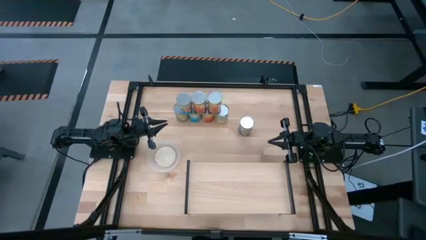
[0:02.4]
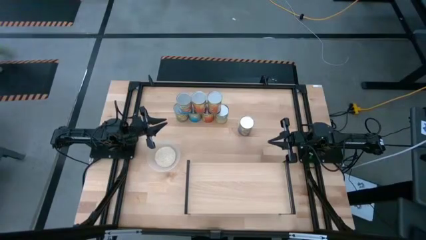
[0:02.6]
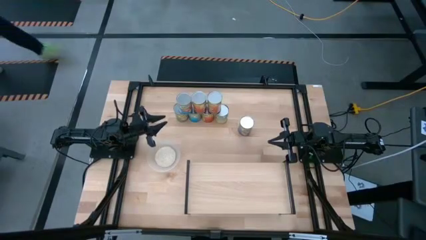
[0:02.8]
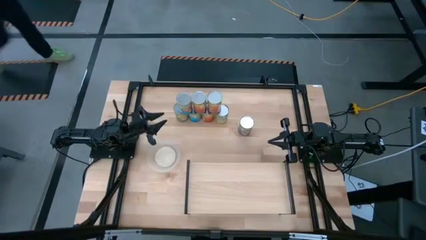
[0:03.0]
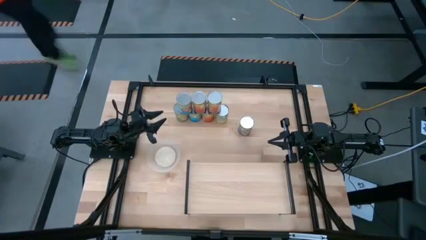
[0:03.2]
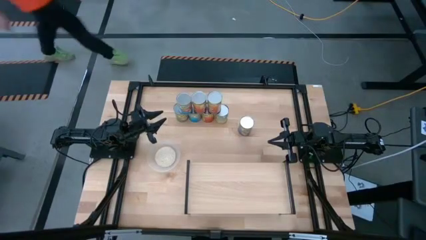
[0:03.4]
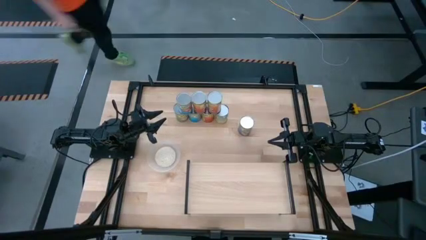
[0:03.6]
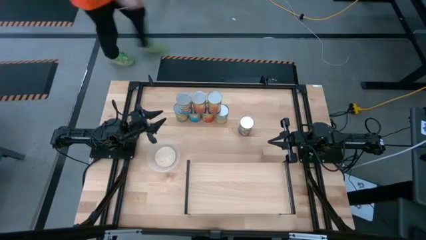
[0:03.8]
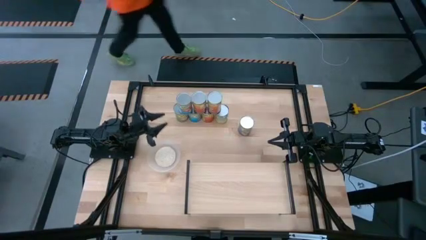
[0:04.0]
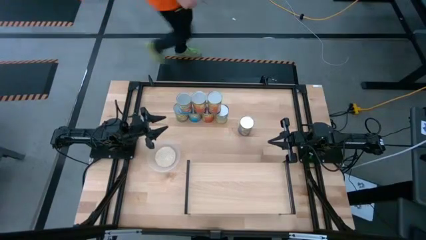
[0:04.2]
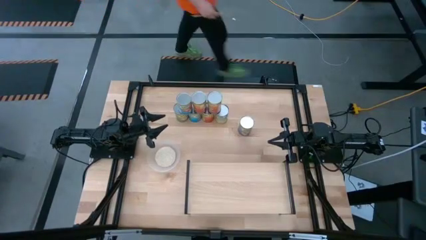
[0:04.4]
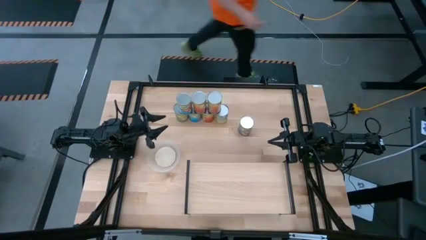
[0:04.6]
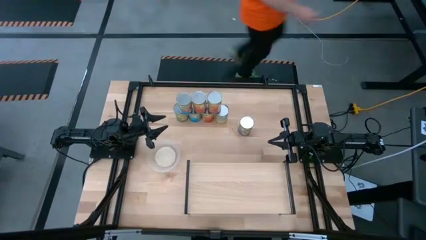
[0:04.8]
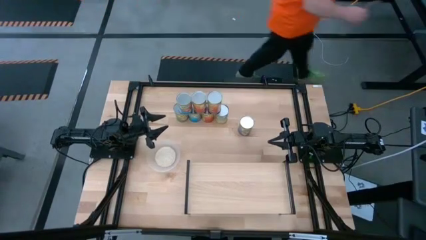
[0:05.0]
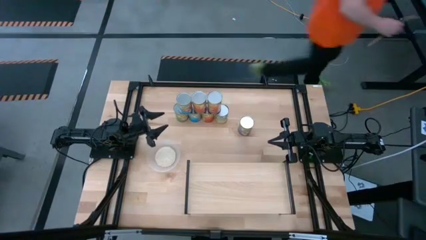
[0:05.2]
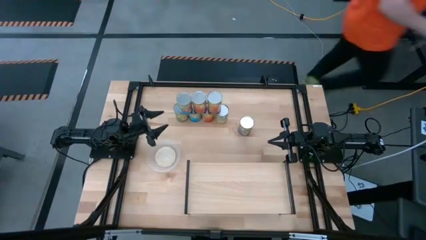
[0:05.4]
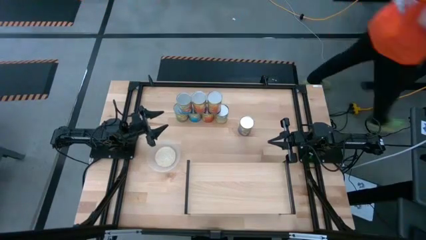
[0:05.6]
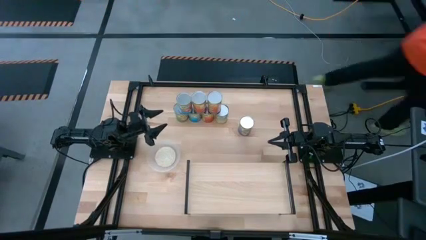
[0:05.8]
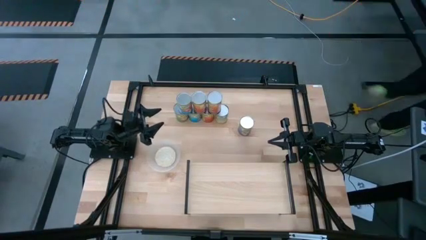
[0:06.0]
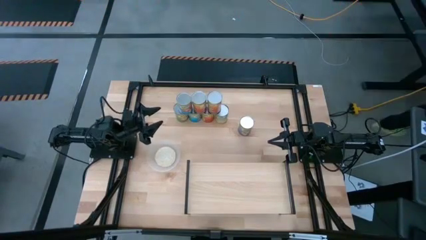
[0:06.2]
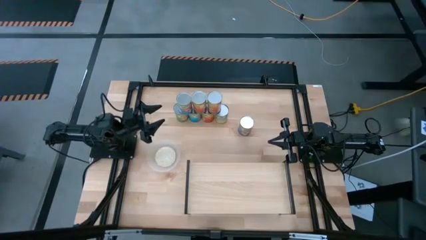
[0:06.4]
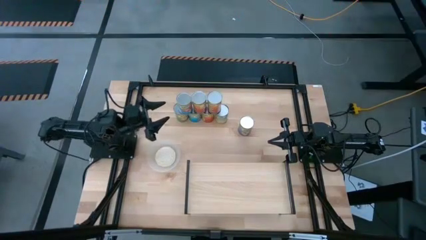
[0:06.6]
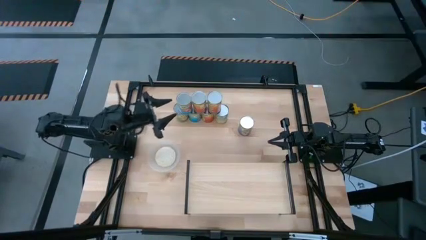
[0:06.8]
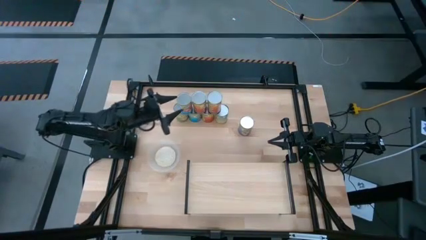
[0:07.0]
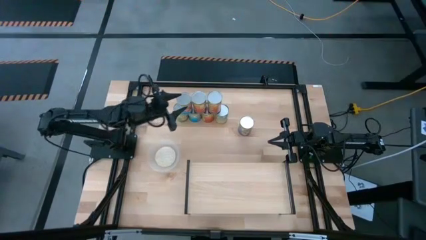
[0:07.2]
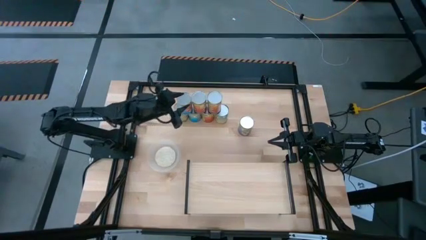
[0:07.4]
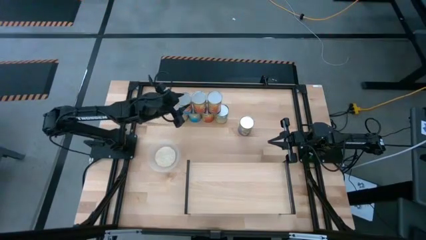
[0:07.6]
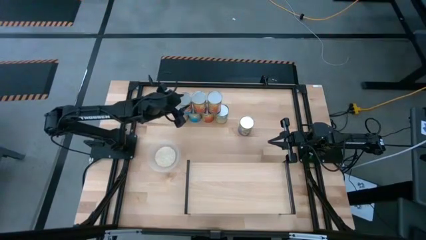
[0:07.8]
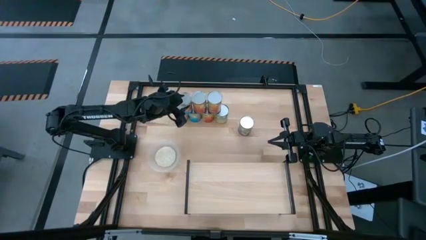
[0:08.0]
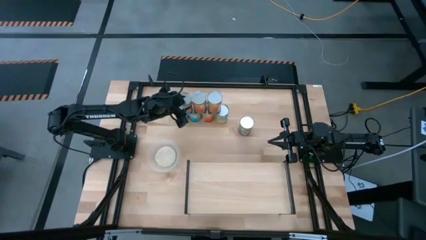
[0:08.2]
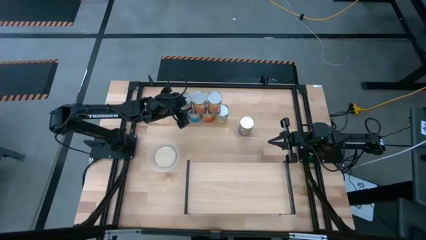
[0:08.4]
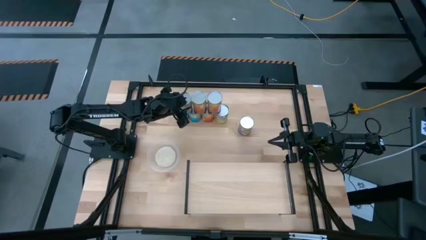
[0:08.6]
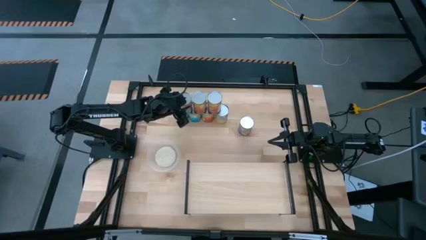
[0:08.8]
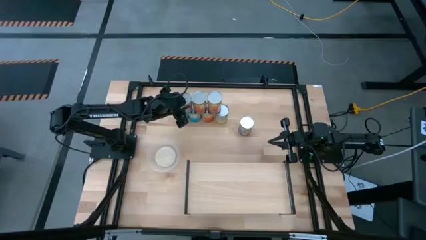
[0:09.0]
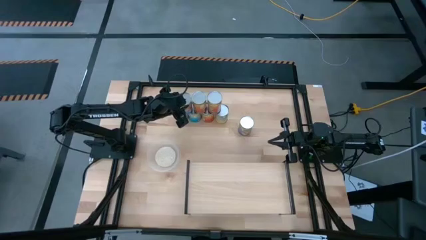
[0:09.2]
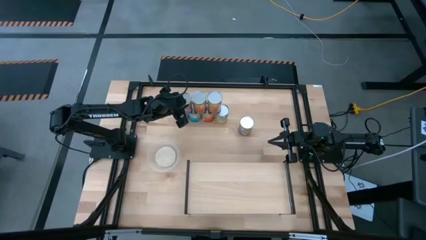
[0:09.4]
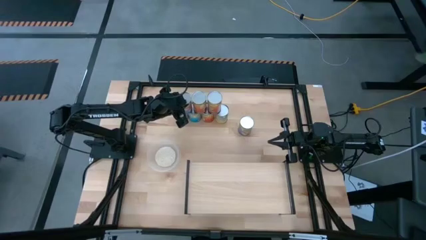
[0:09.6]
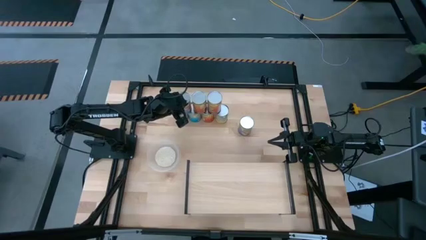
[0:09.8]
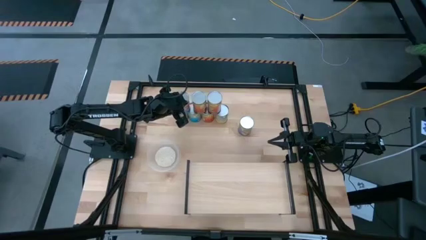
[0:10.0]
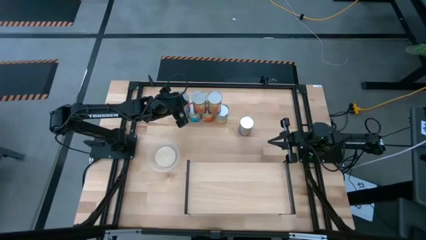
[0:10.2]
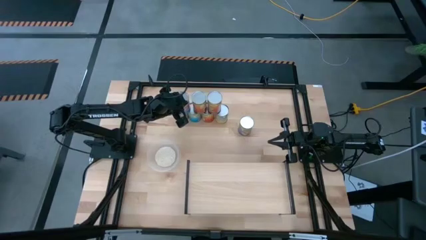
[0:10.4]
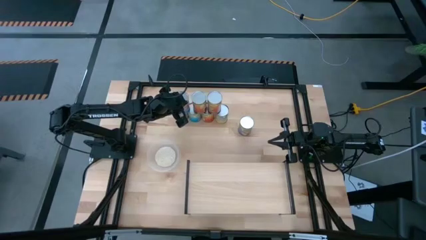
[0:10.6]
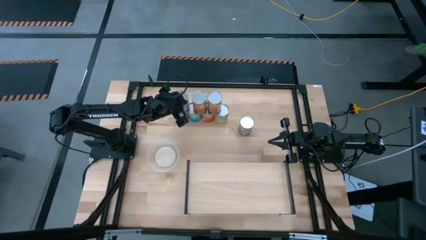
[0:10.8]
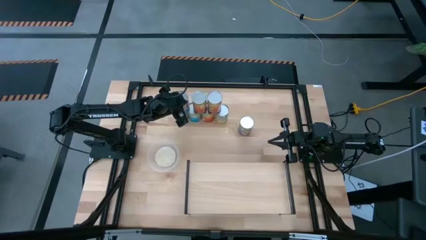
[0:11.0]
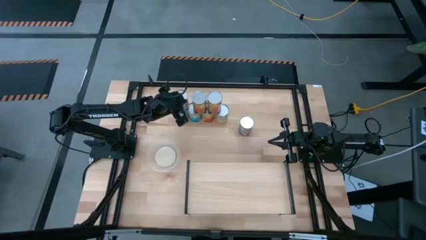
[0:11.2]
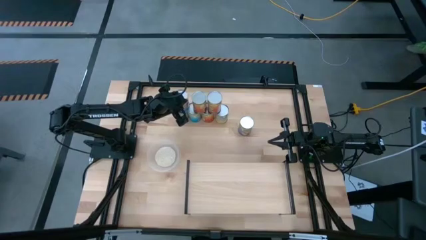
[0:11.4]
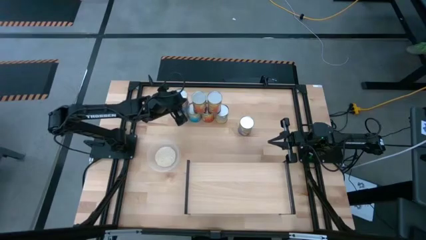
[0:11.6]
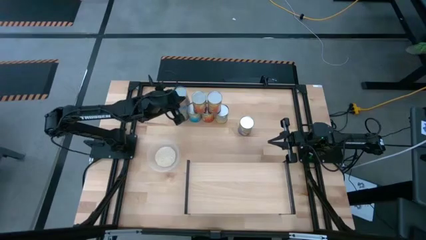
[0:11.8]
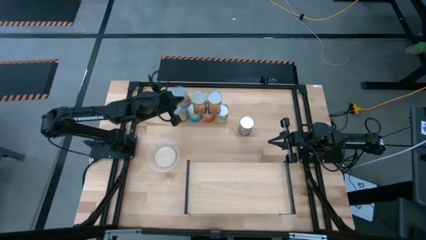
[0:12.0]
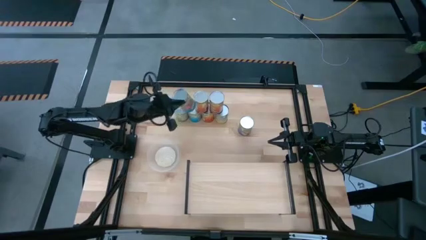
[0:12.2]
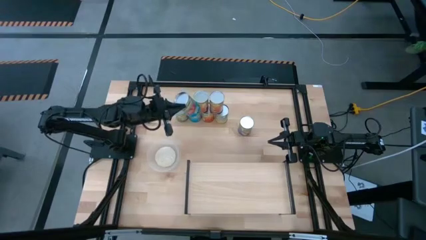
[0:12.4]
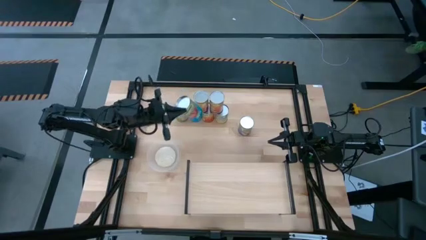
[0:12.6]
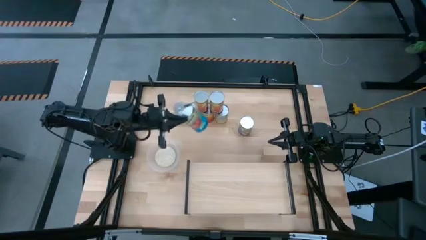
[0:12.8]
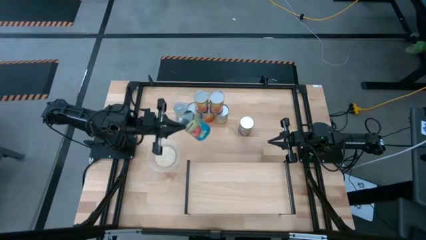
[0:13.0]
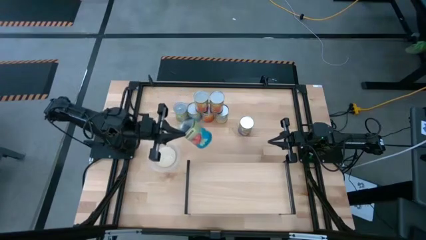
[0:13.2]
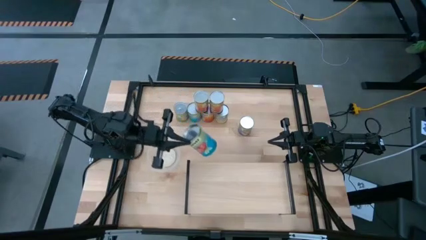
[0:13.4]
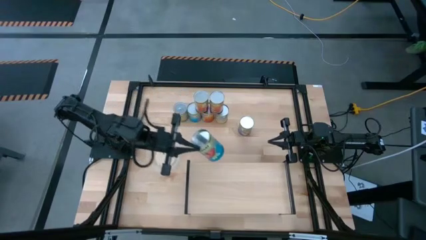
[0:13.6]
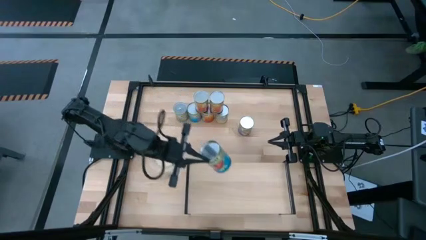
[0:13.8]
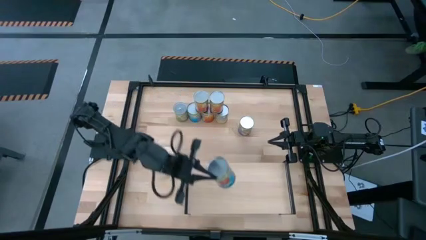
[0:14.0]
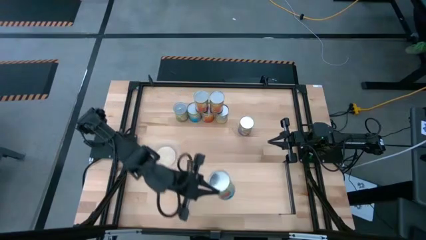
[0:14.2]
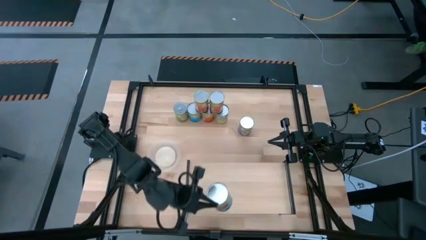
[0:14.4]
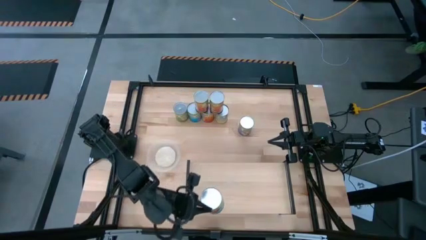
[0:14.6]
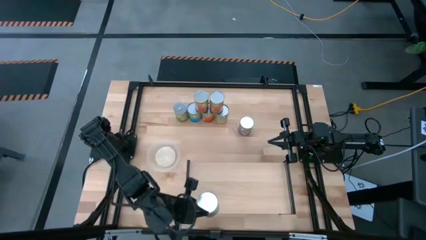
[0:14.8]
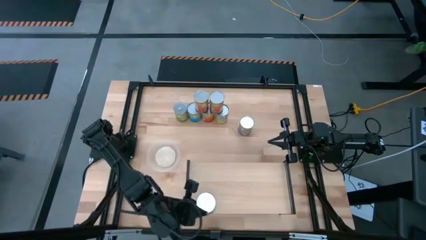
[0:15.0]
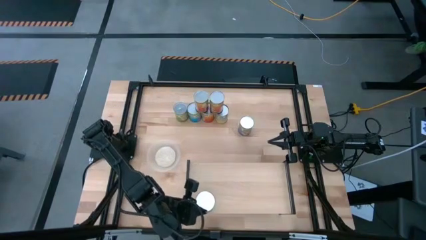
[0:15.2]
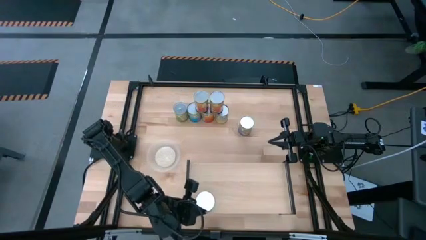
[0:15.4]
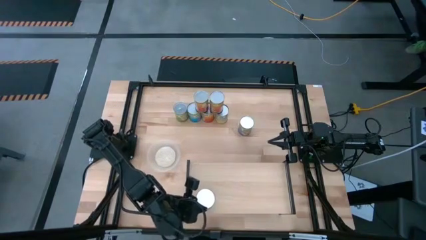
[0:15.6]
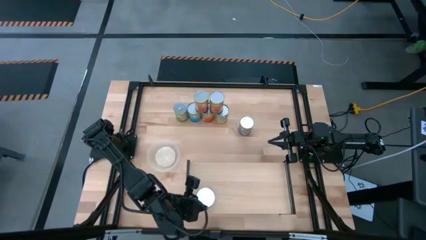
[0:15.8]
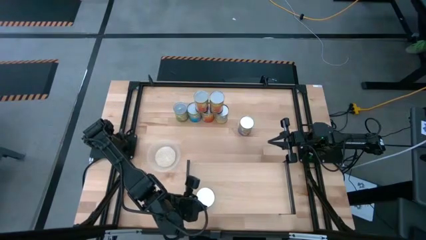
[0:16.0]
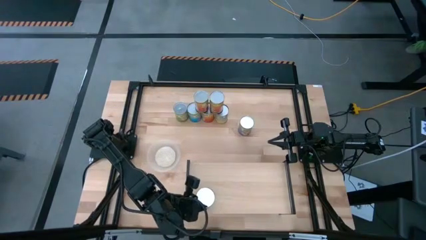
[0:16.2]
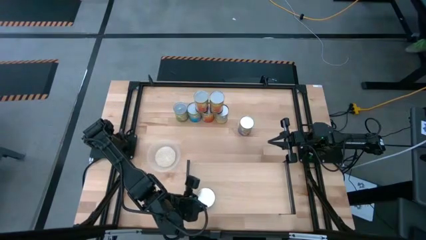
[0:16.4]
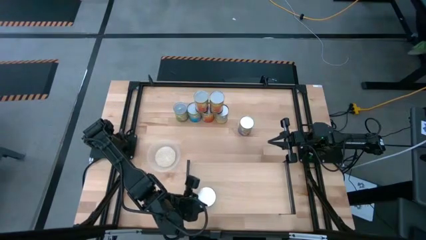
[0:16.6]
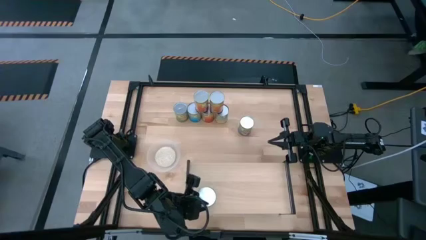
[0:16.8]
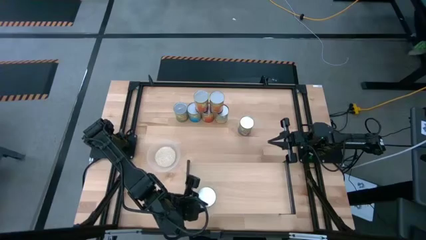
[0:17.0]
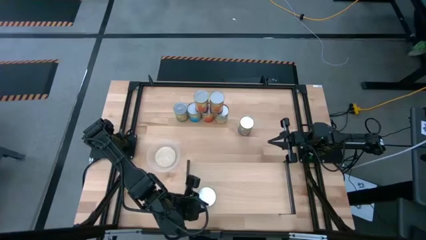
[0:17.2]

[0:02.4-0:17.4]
Task: Pick and place cans onto a shelf
Put the canned tomatoes on the shelf
